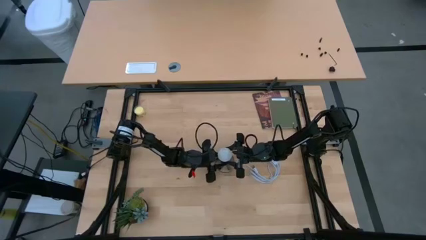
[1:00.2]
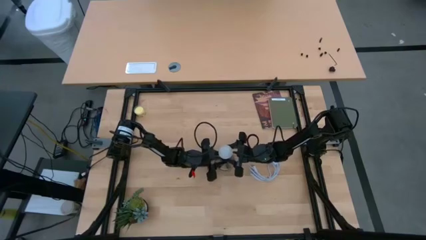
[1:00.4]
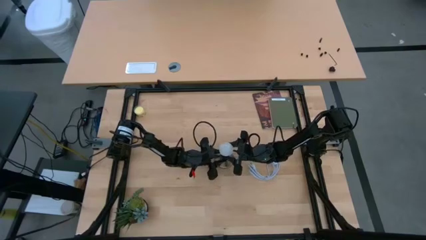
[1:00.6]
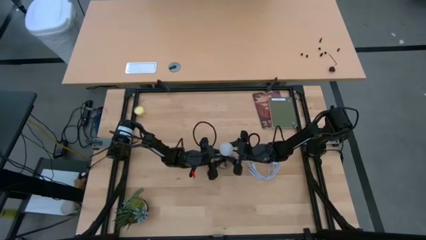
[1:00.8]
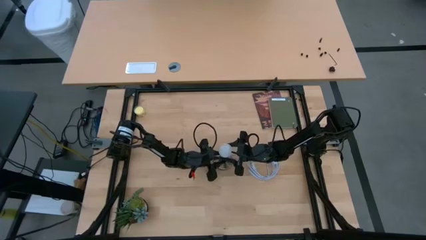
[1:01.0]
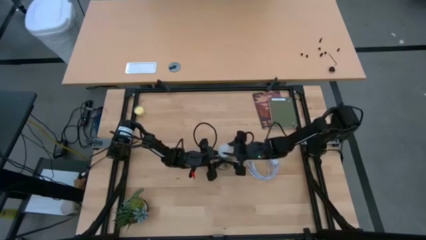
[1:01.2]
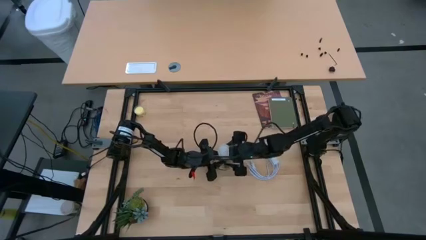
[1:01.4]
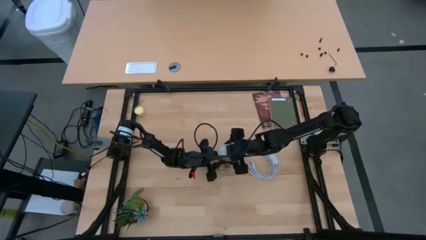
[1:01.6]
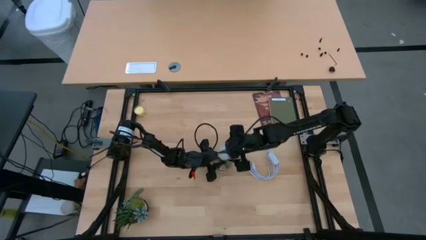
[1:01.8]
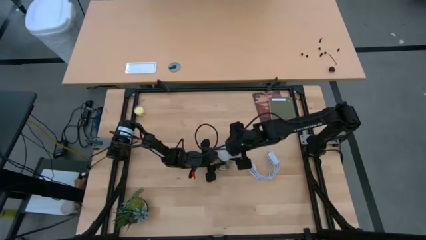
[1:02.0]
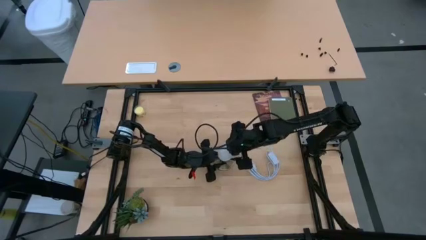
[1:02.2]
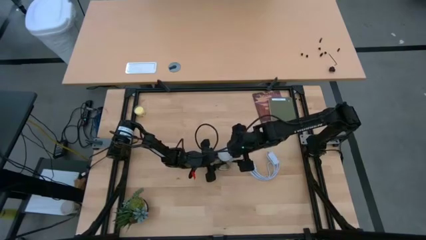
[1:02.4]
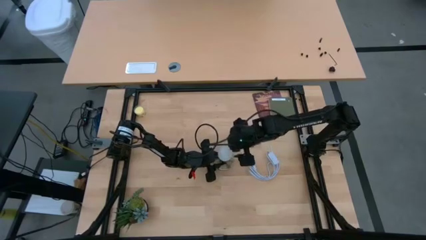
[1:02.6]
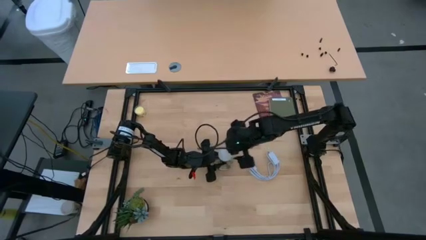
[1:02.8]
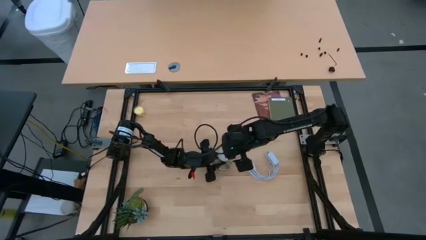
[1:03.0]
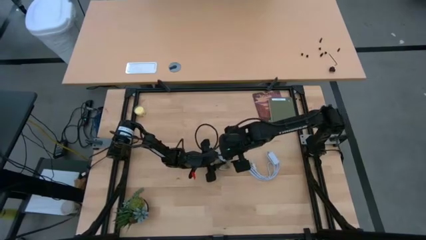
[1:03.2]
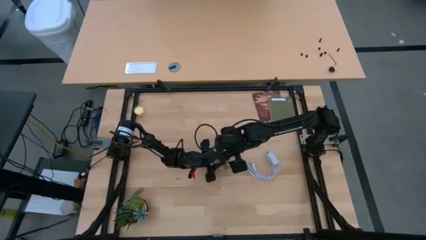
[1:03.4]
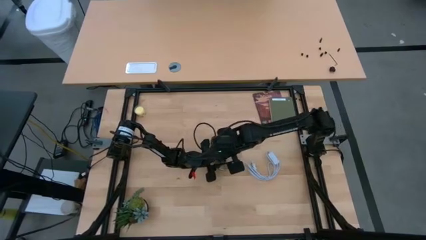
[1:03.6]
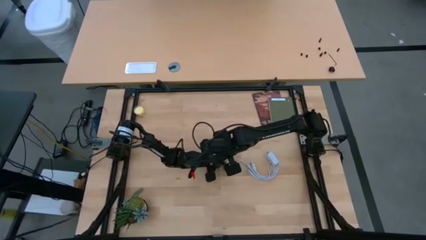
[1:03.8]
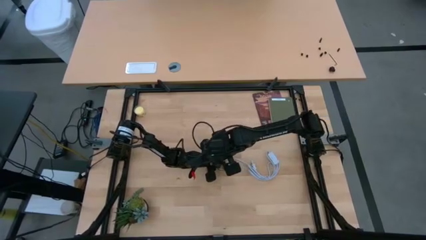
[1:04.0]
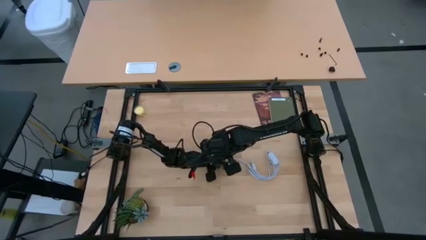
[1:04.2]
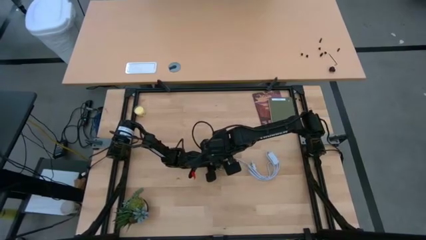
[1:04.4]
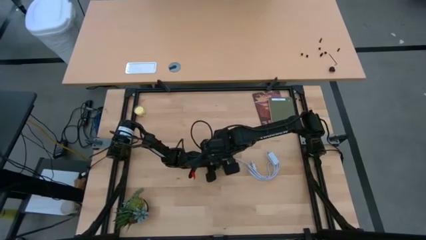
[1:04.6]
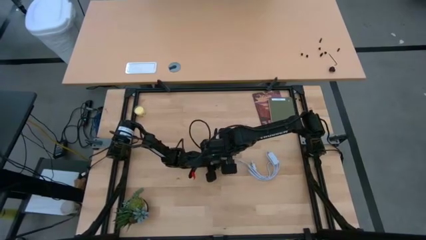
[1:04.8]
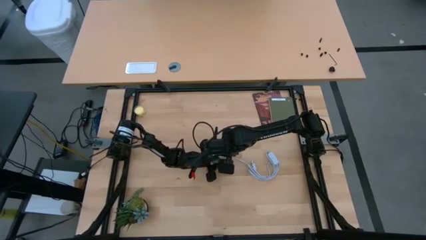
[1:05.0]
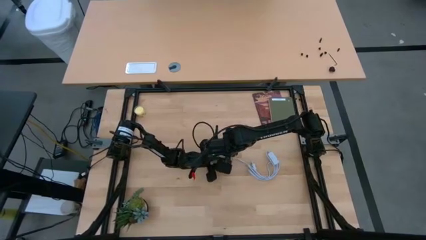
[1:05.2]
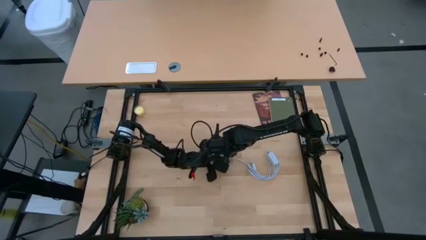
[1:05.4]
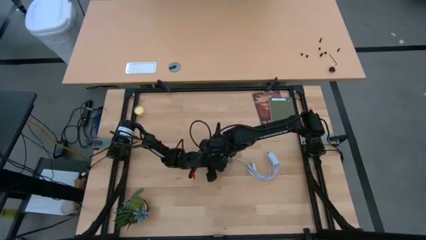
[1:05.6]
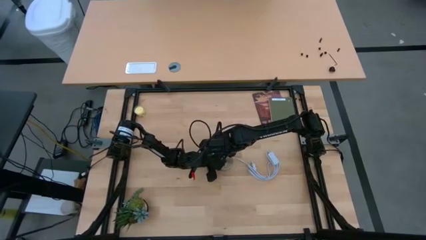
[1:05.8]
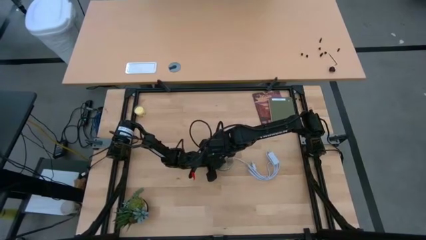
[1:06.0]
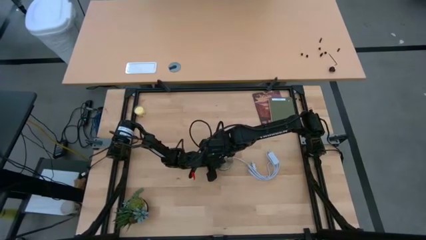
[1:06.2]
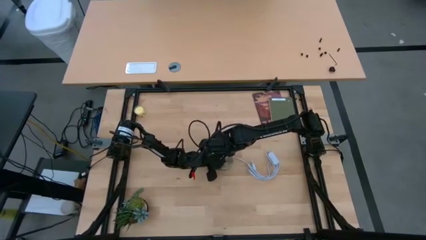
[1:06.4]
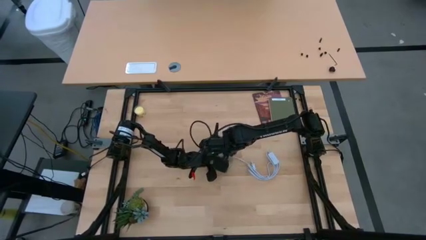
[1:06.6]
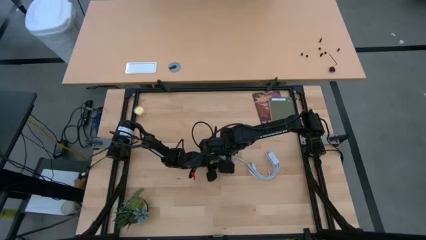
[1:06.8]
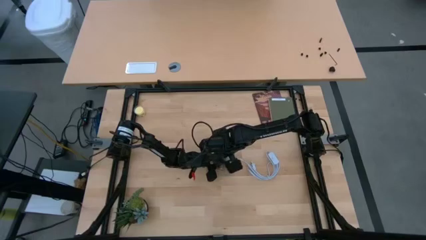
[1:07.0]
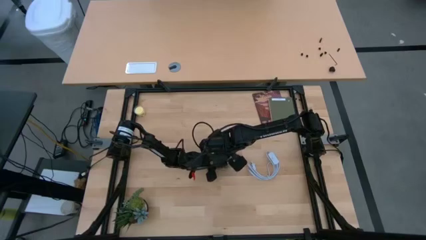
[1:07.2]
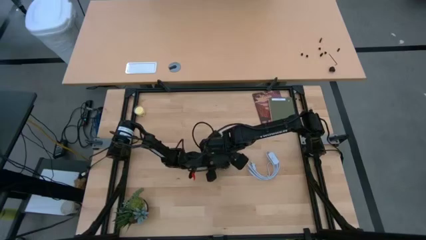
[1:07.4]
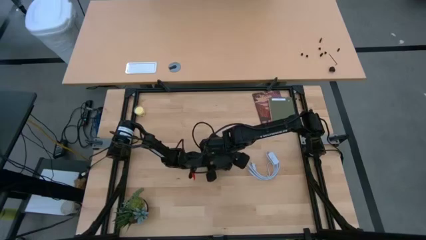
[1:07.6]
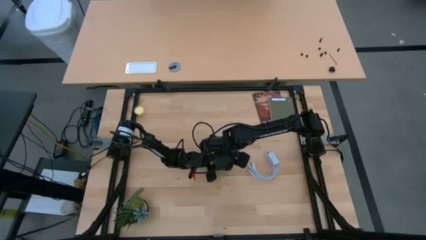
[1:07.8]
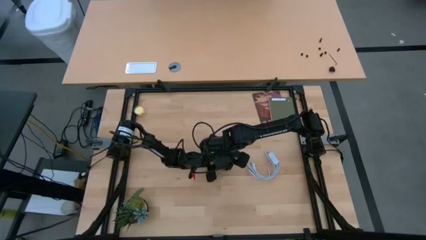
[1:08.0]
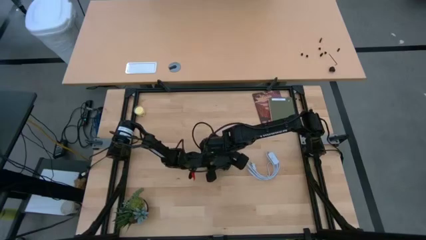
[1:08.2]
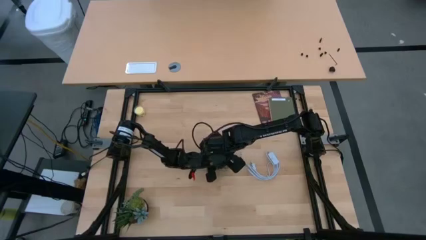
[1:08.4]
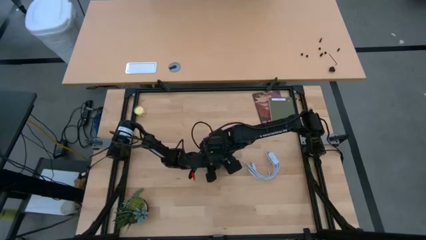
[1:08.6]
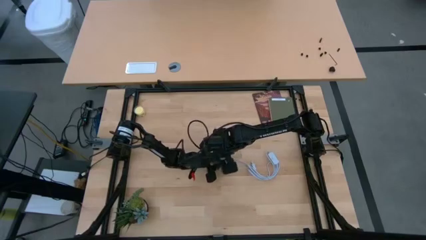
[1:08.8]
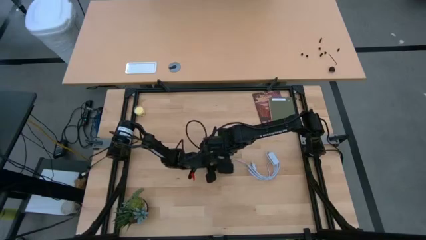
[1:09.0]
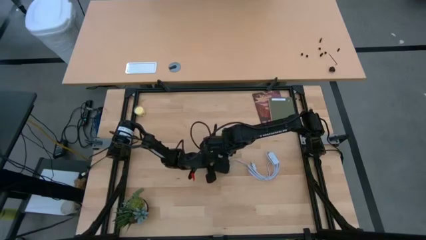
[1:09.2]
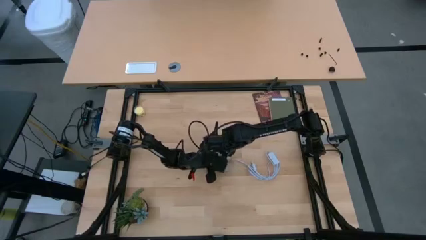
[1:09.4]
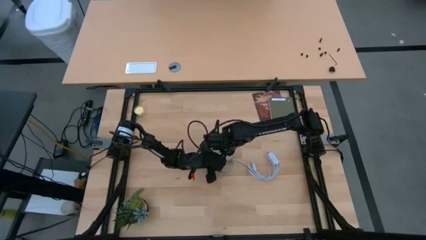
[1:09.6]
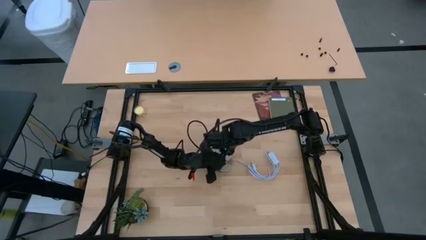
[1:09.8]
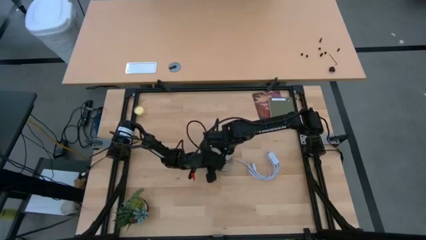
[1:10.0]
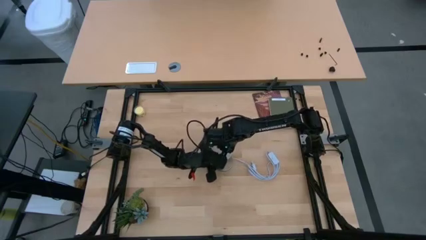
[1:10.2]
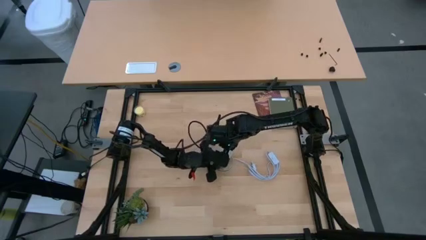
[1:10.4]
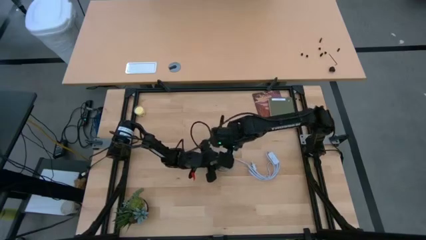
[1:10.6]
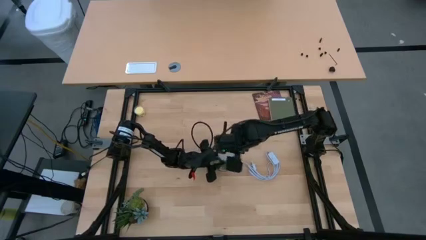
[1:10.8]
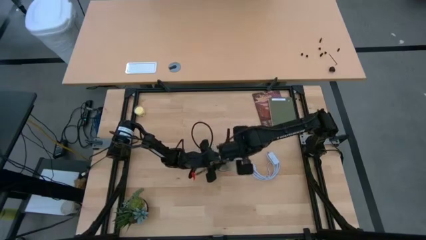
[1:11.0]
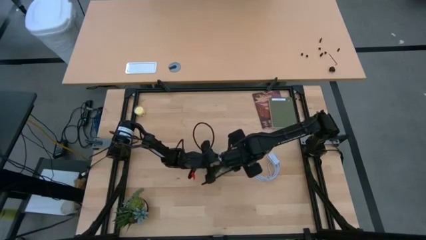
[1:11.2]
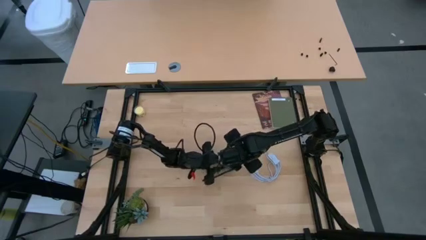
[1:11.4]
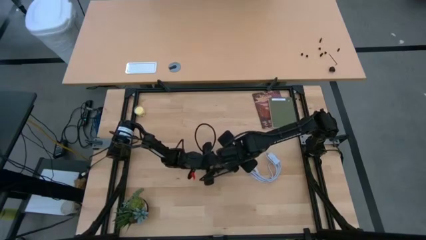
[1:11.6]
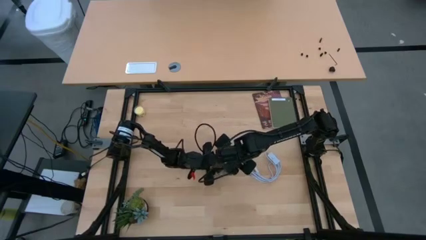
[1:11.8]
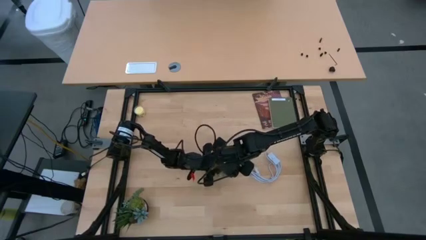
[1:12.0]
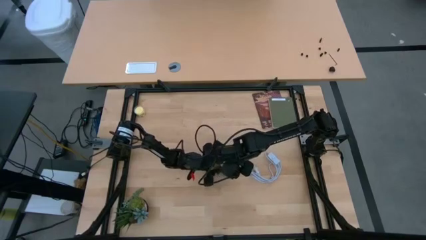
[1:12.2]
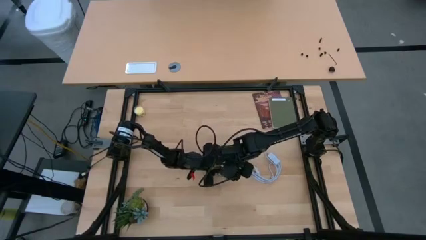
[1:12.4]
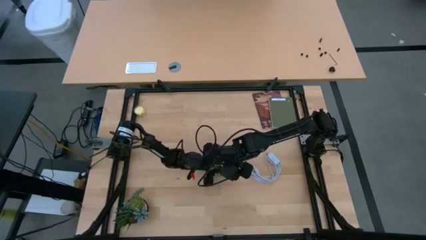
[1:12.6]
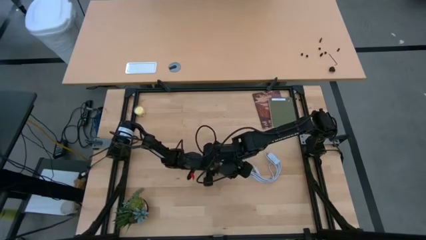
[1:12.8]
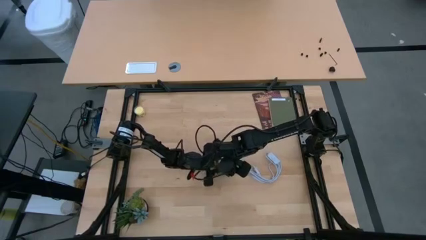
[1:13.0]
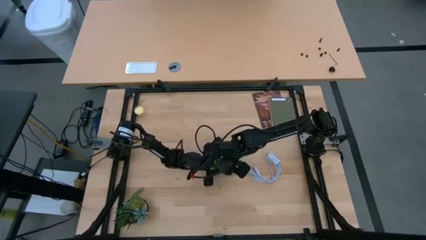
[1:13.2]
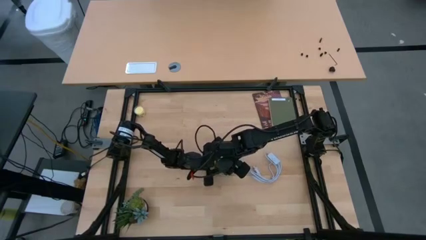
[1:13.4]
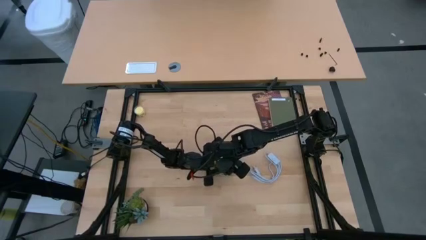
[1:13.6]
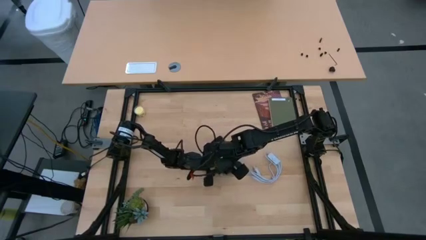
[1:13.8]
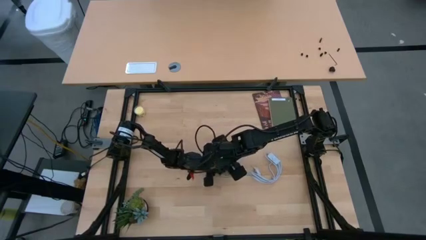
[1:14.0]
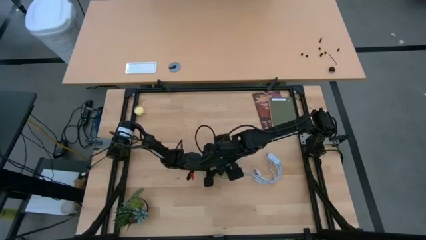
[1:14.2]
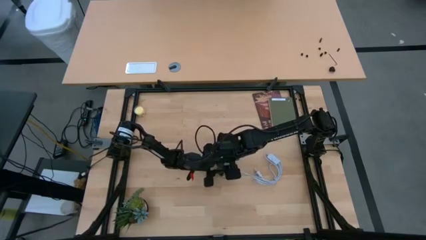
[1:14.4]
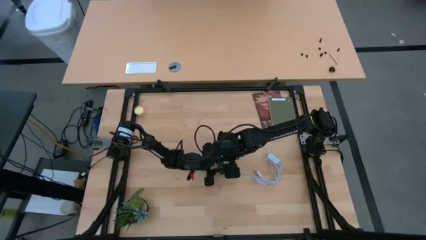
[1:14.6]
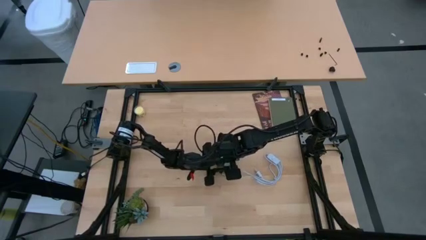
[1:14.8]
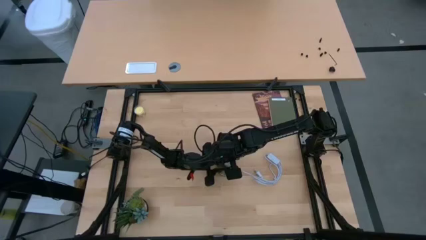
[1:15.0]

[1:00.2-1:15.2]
Task: Screw lightbulb
Insert the light bulb into the lamp
